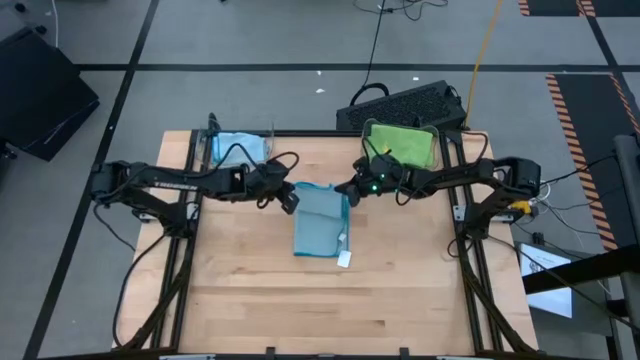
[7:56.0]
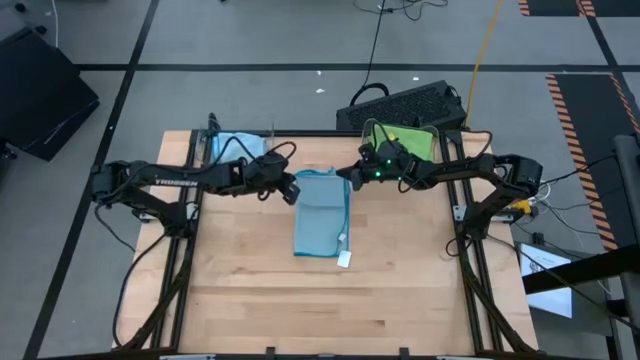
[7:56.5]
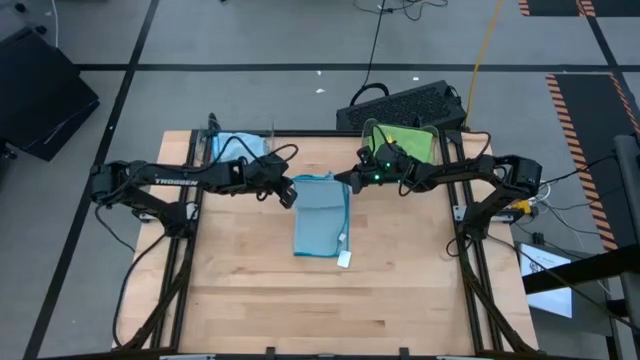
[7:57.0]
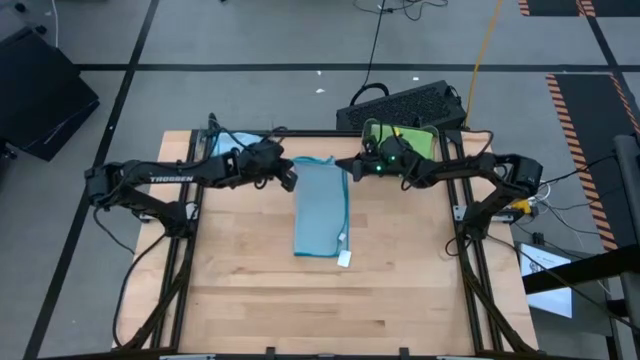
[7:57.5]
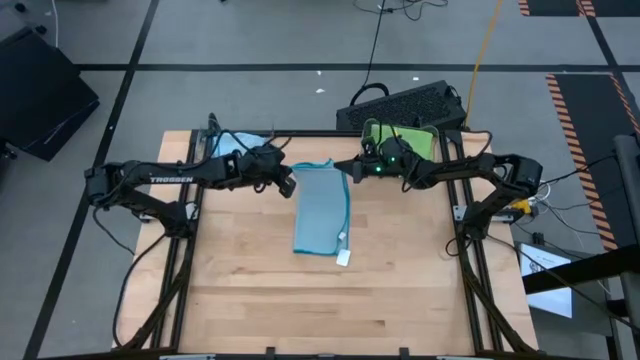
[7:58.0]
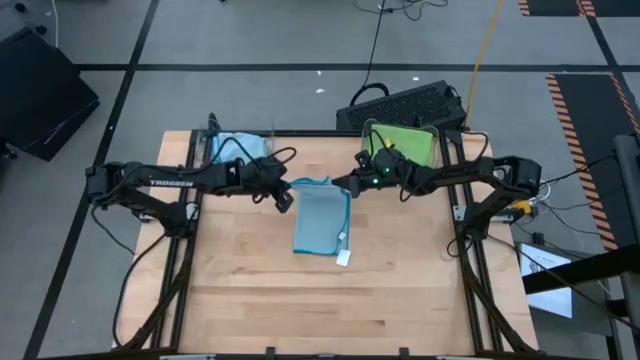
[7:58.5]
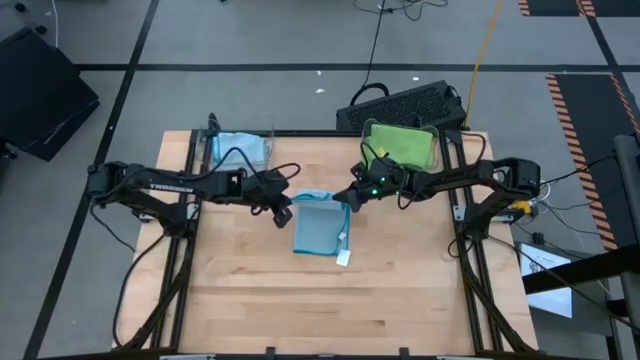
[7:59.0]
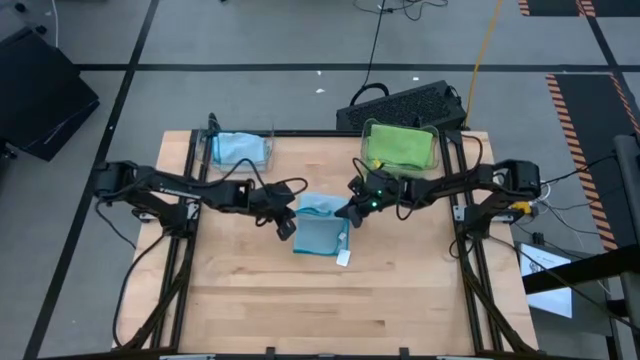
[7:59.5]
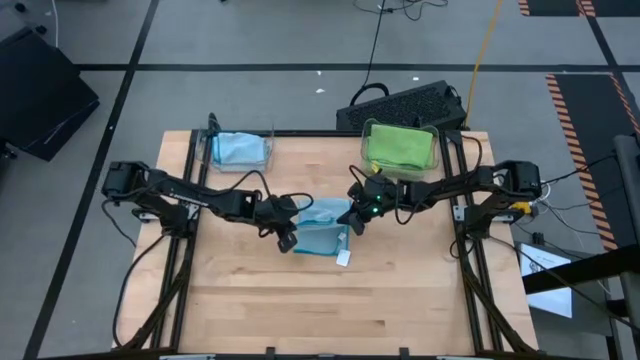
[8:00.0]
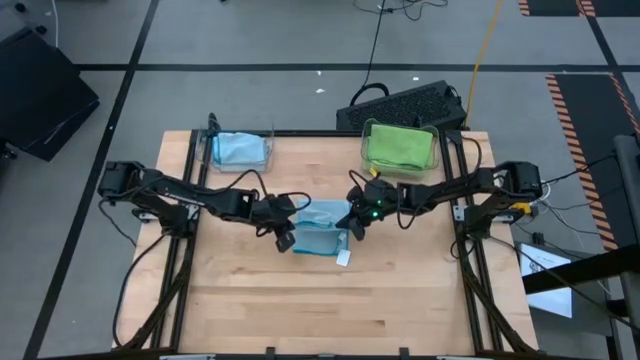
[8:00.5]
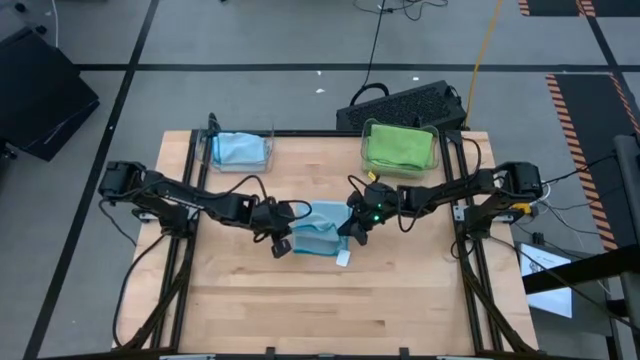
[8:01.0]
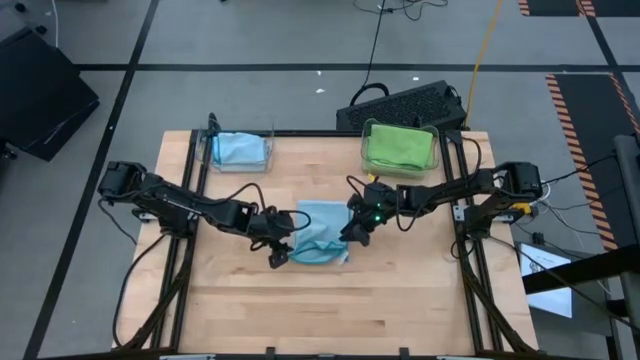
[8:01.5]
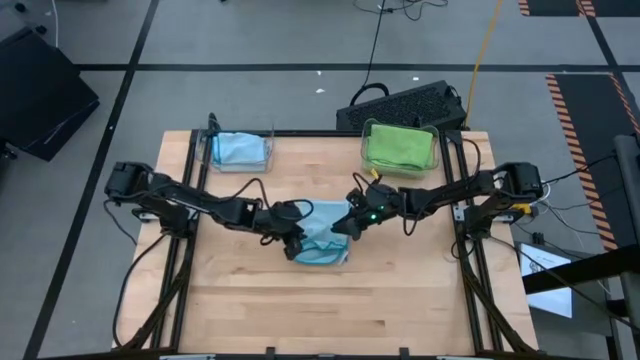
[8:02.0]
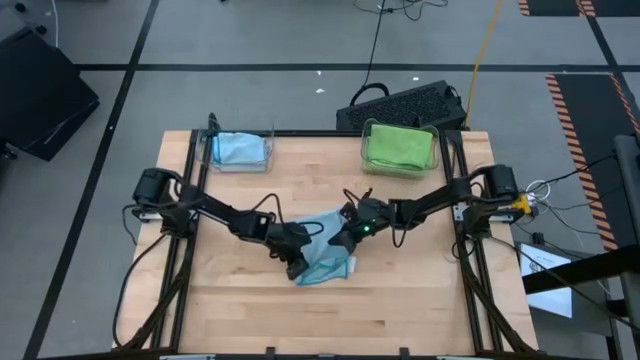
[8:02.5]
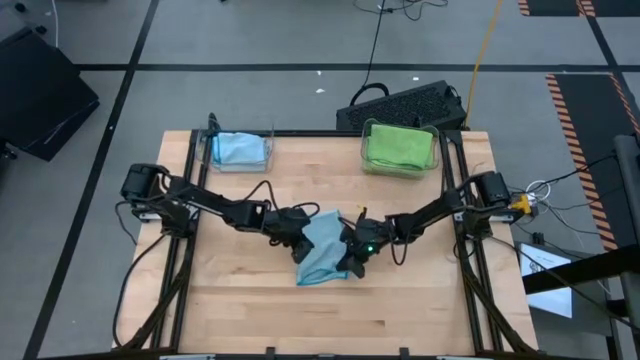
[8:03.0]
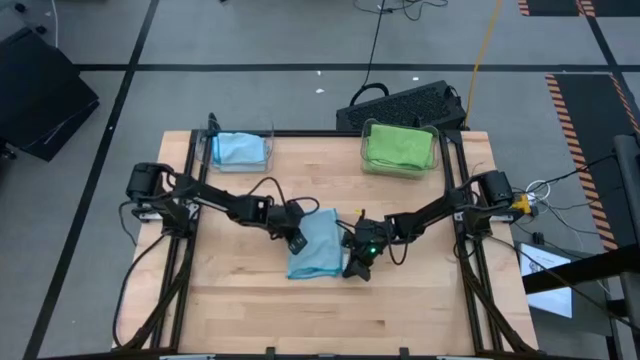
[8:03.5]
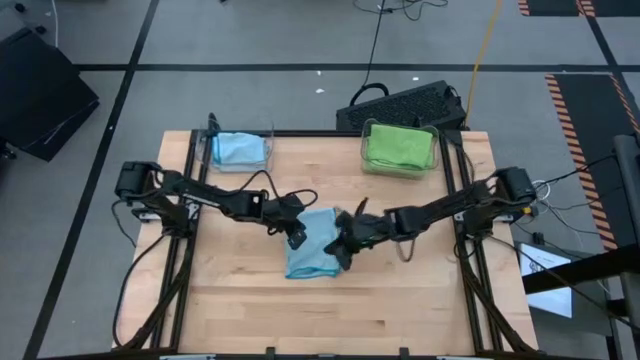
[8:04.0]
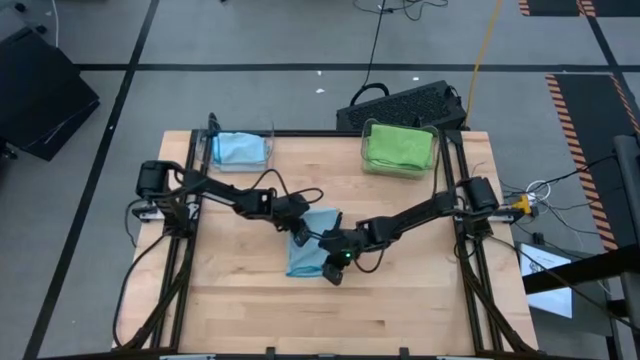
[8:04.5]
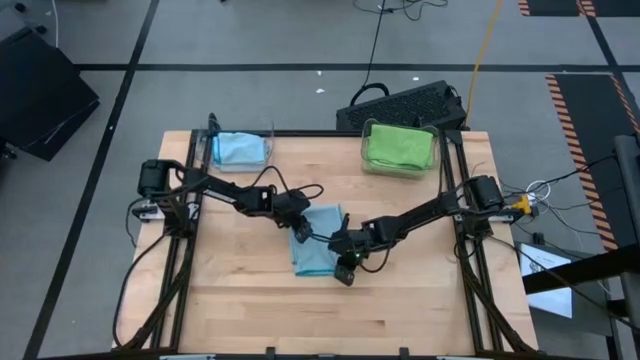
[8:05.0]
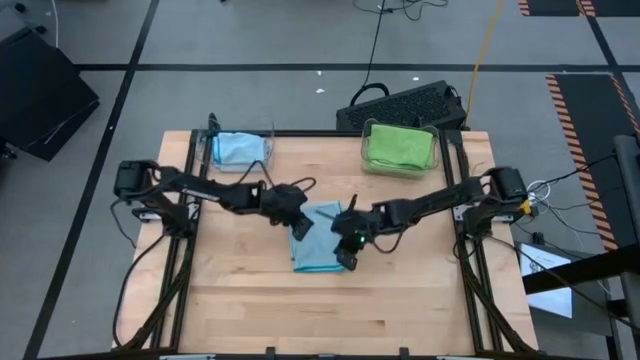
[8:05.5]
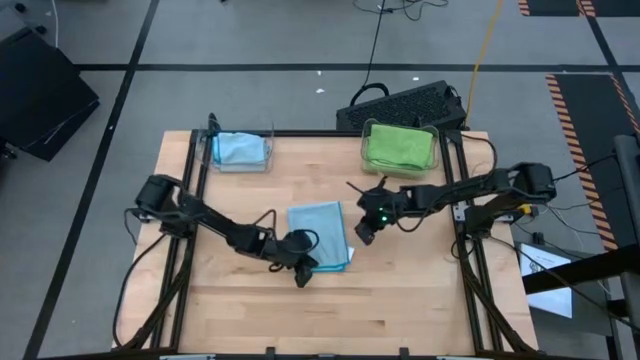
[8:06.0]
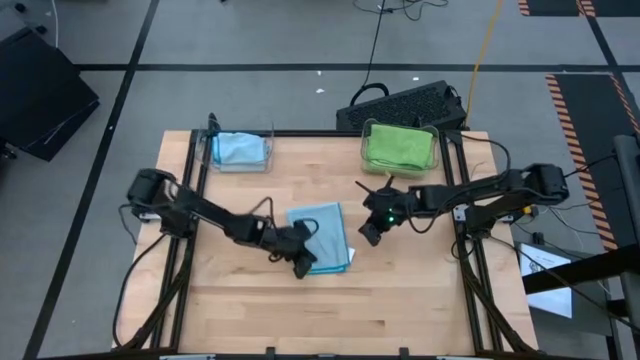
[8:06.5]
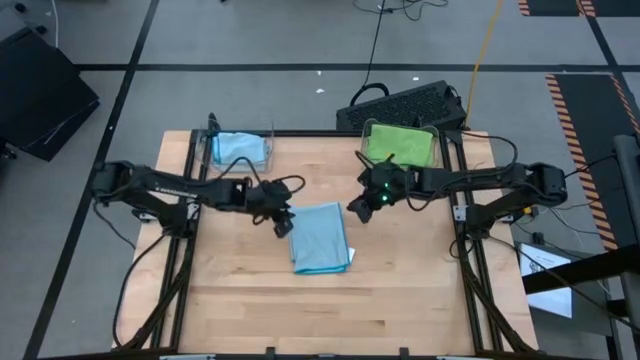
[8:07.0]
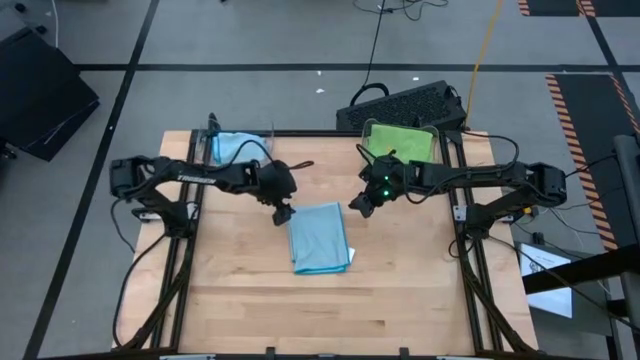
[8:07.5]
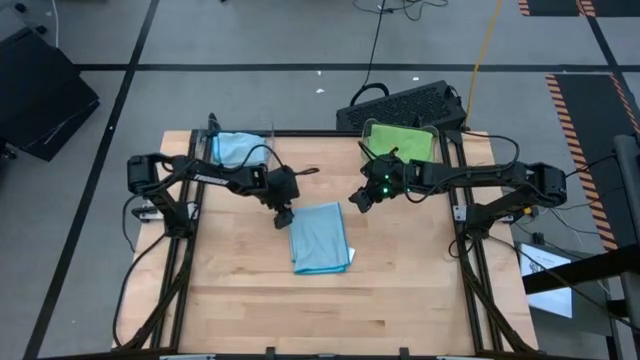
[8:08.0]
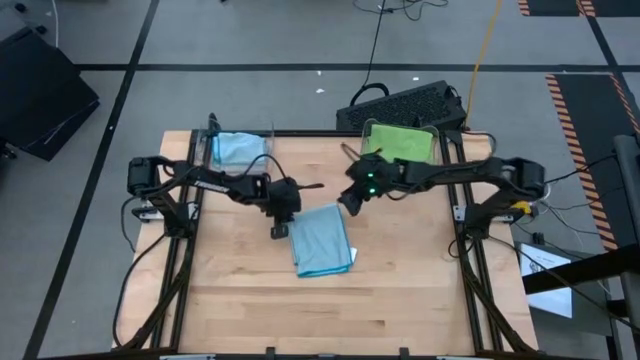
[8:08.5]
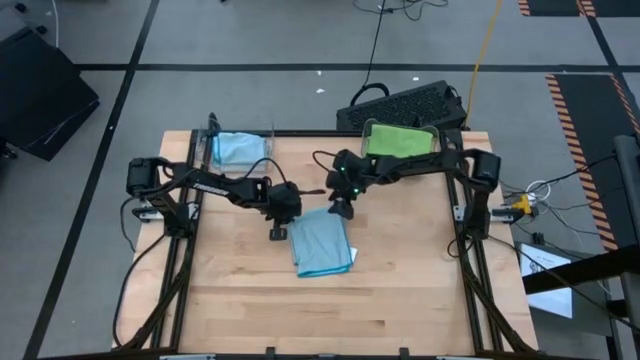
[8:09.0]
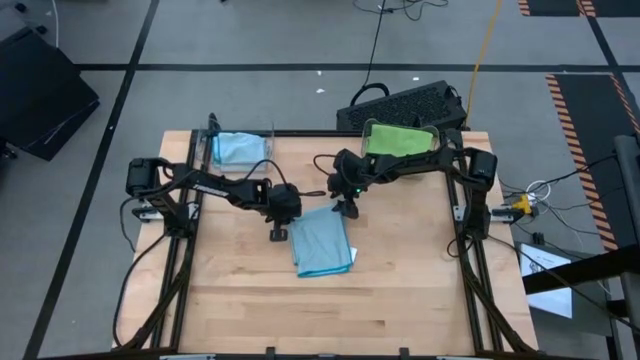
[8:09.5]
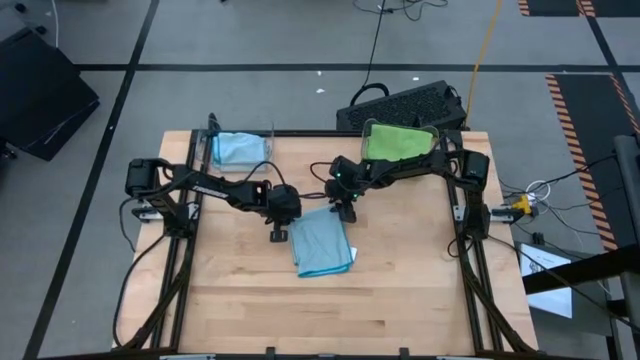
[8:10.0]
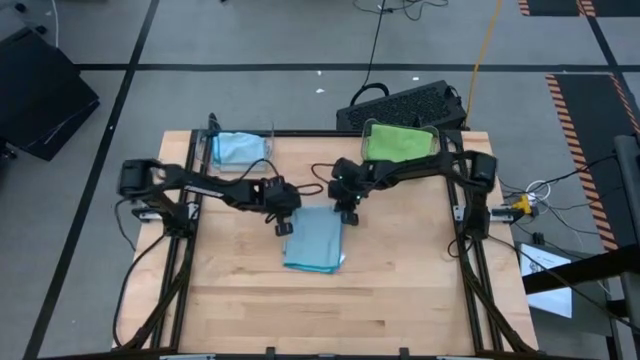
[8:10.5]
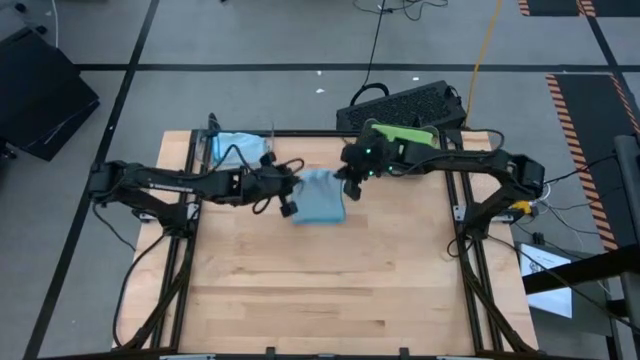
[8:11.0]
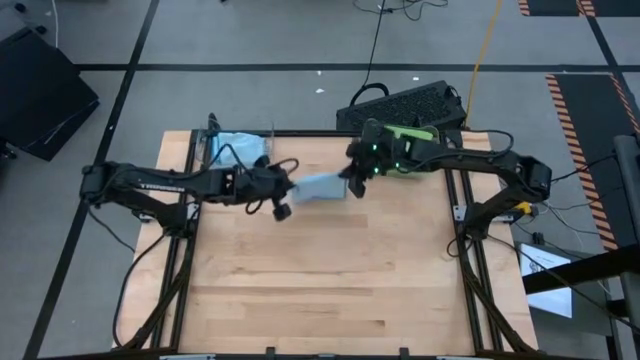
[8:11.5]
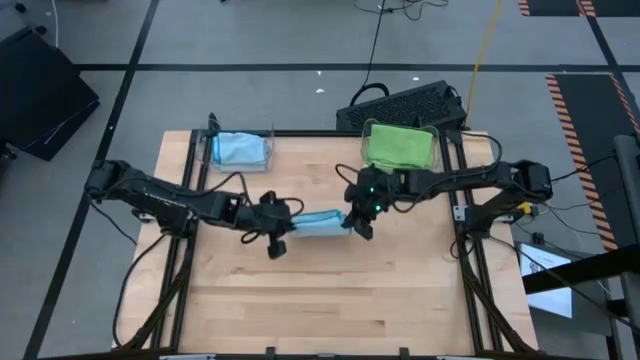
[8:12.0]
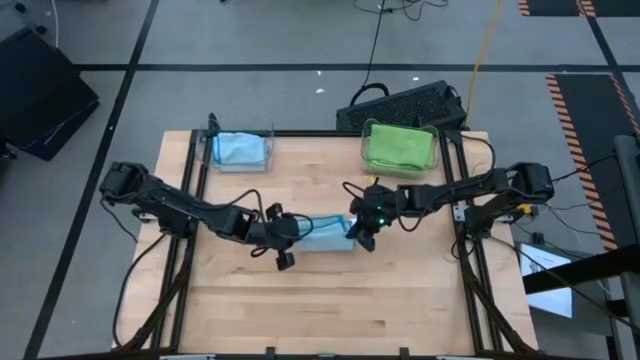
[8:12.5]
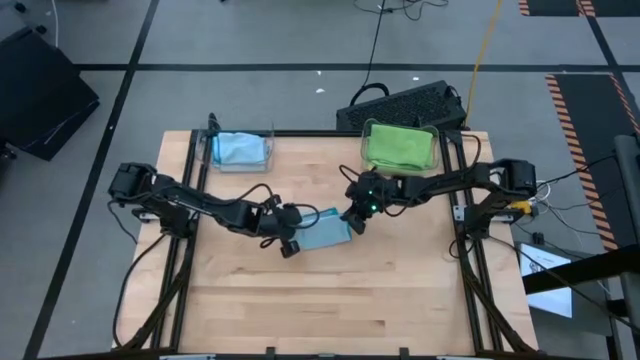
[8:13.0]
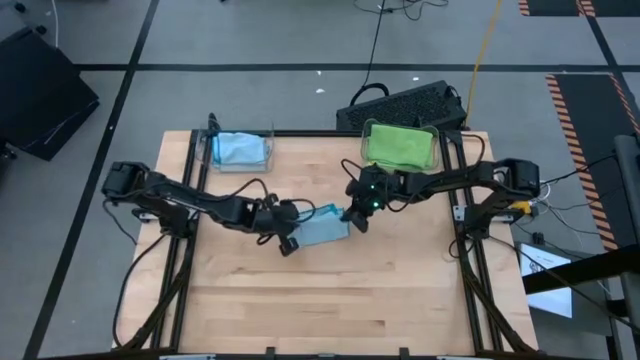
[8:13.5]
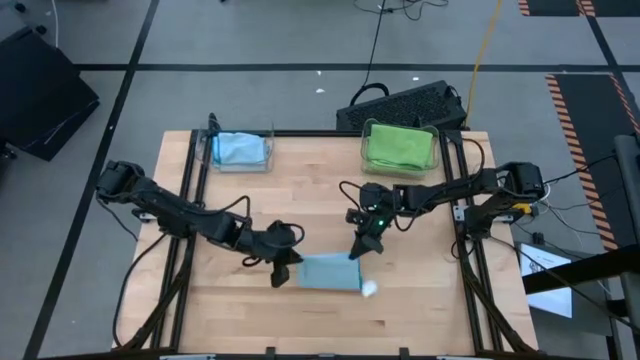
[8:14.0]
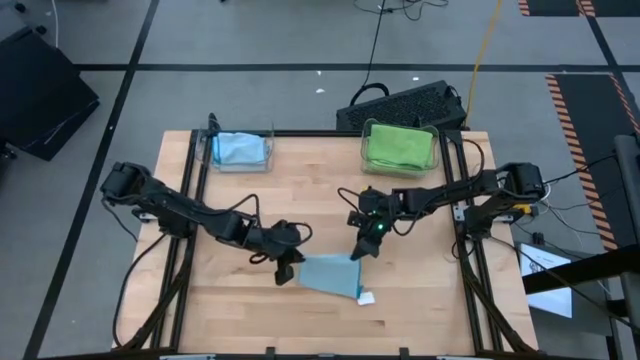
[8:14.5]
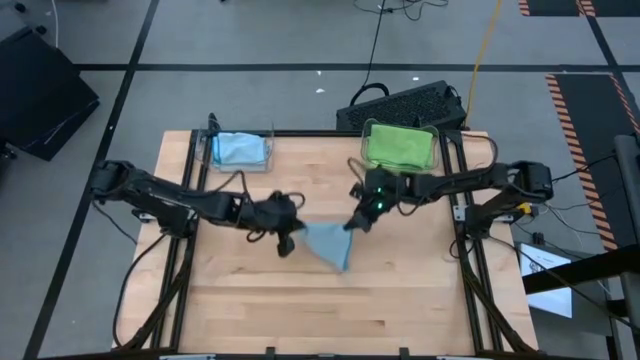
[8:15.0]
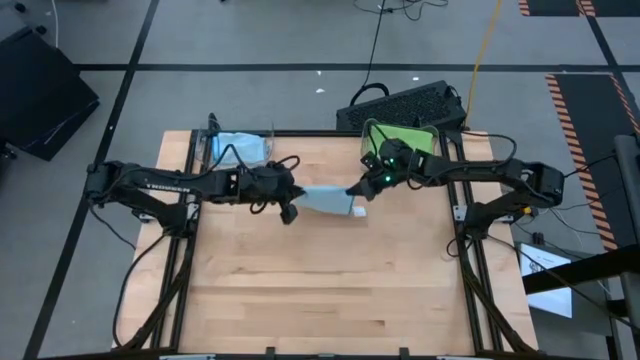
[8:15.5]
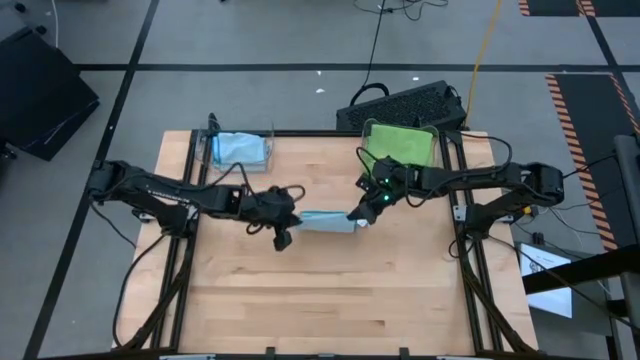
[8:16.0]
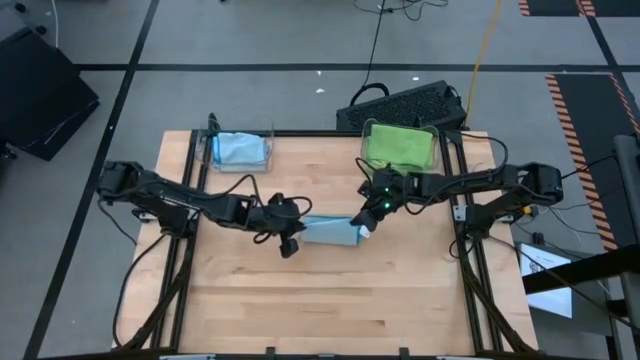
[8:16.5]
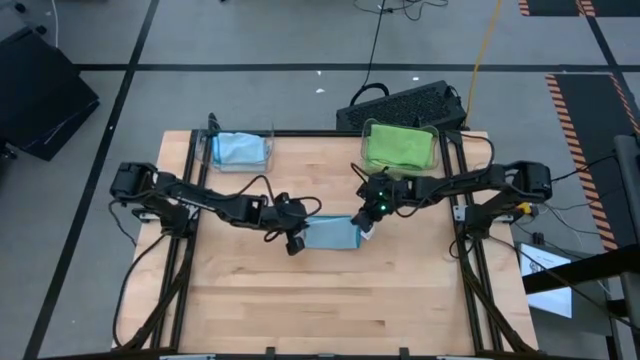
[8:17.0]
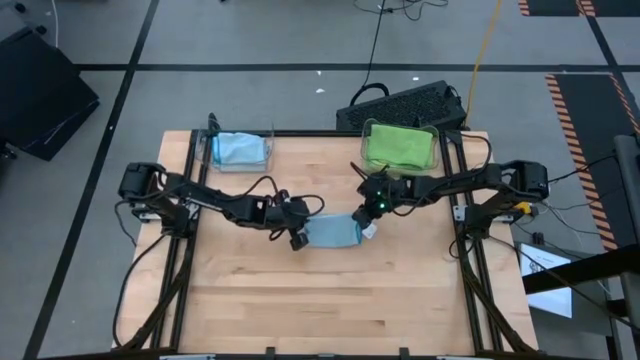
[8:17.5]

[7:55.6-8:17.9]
Task: Sort microfiber towel by color & place in baskets
Fold the blue towel
